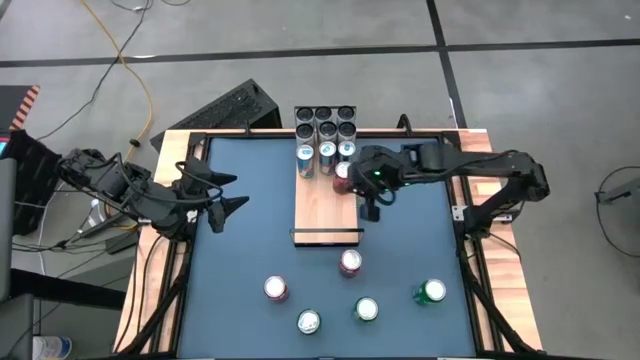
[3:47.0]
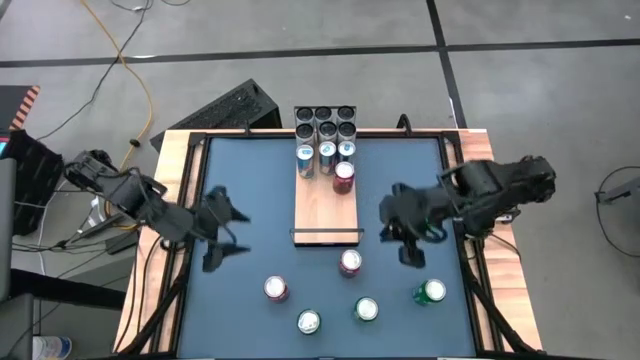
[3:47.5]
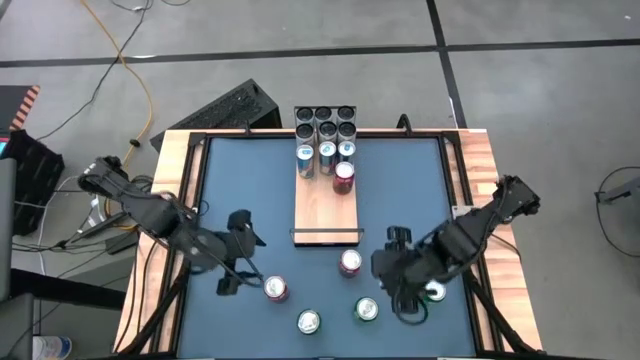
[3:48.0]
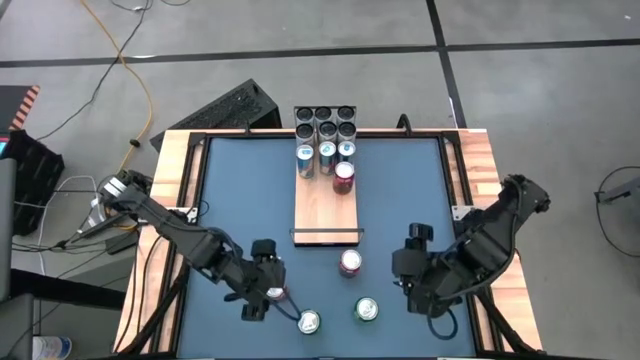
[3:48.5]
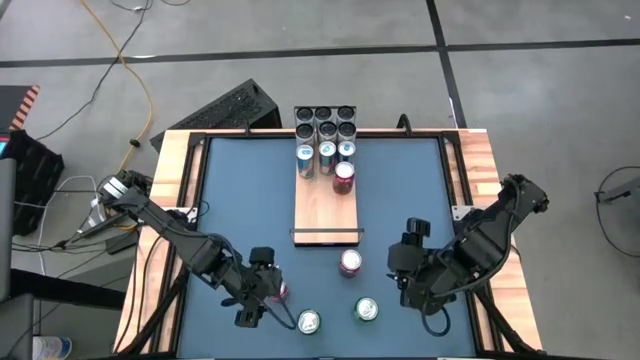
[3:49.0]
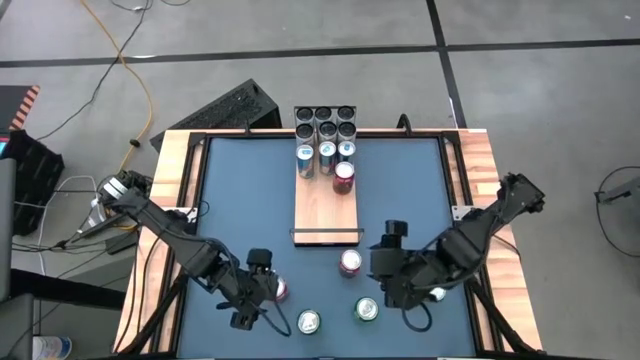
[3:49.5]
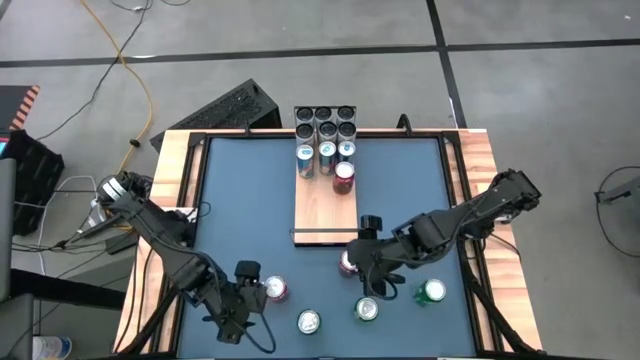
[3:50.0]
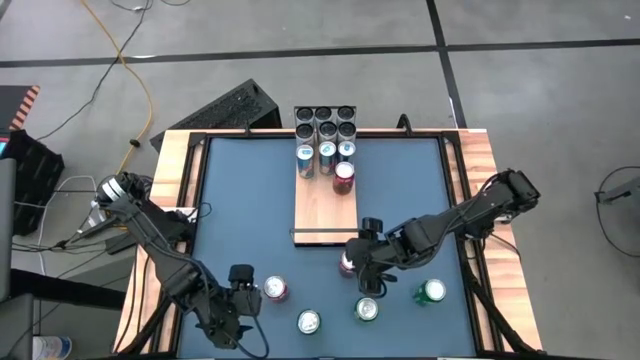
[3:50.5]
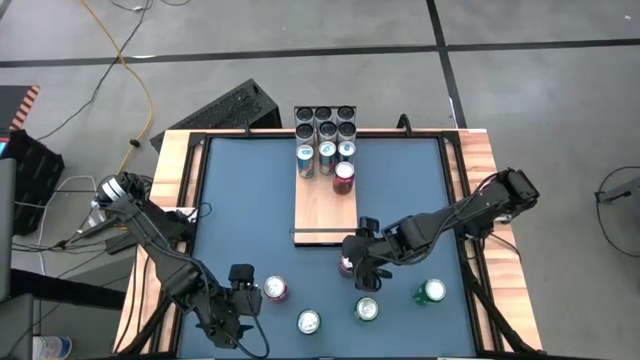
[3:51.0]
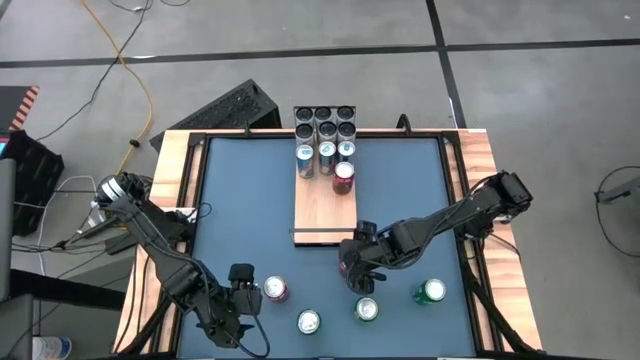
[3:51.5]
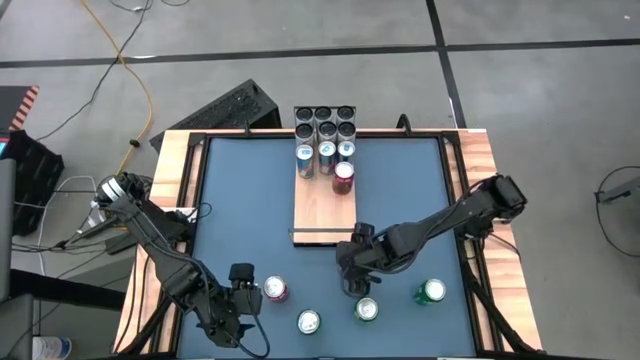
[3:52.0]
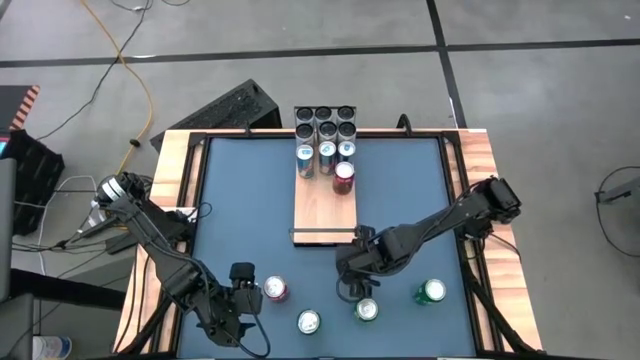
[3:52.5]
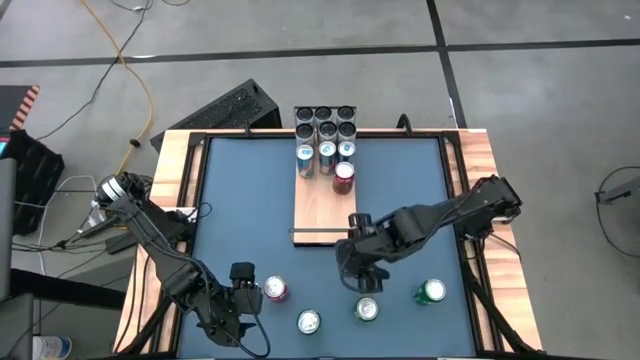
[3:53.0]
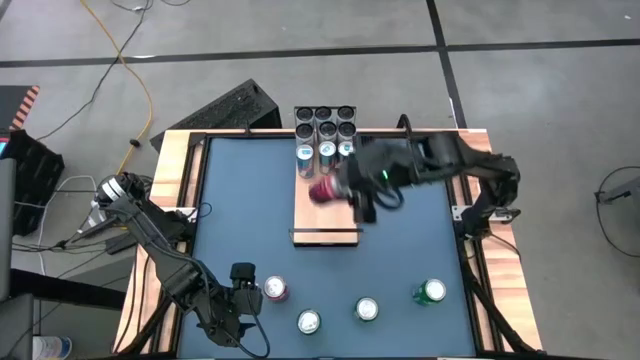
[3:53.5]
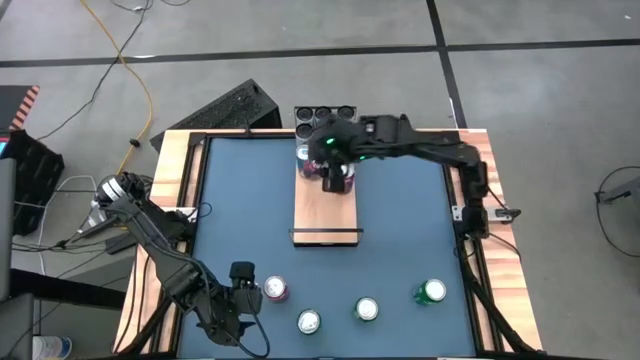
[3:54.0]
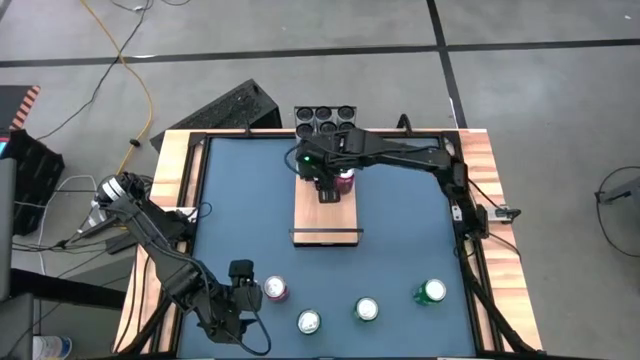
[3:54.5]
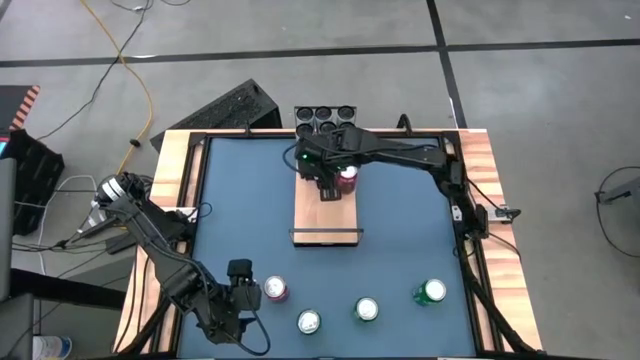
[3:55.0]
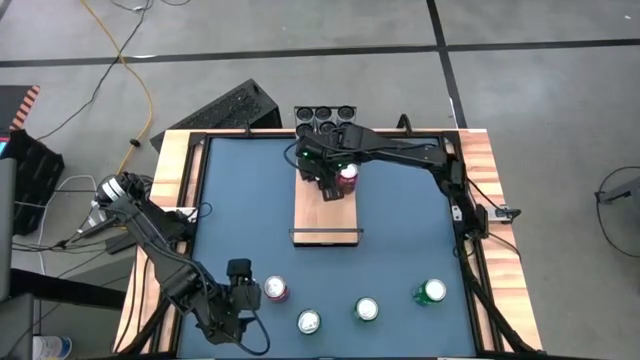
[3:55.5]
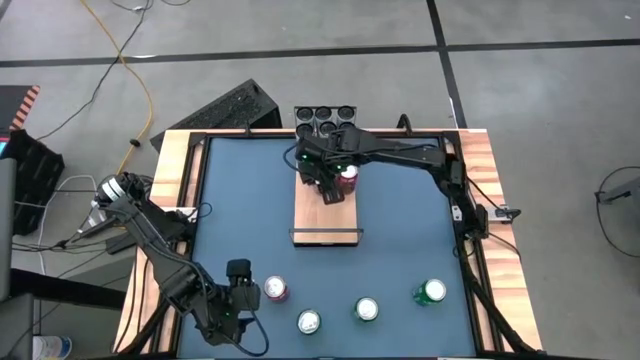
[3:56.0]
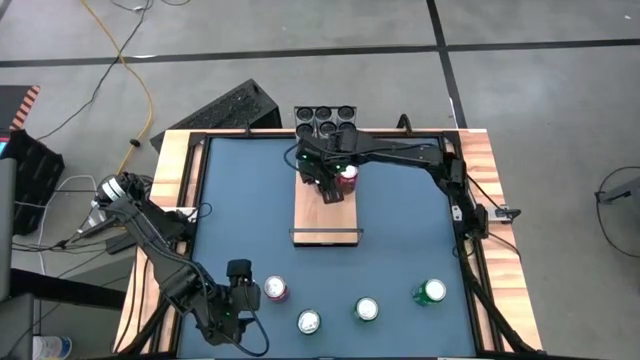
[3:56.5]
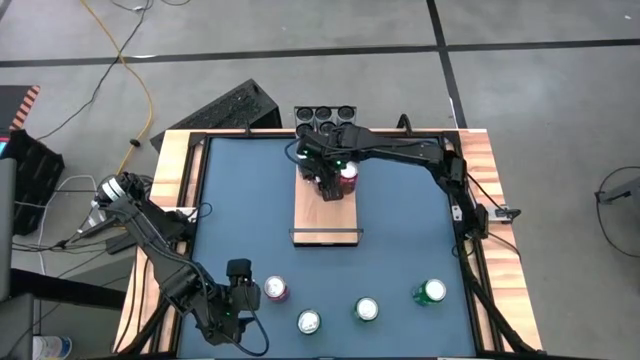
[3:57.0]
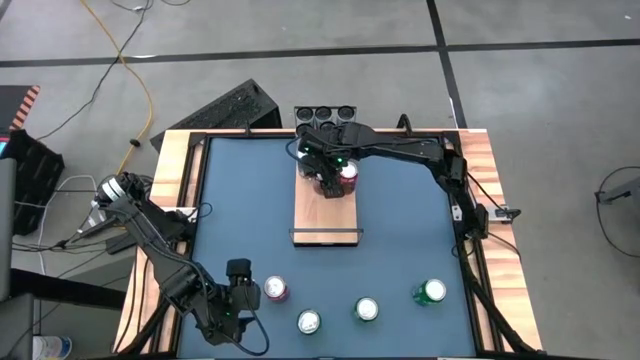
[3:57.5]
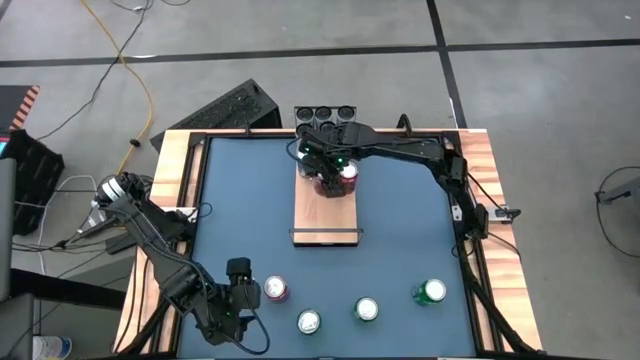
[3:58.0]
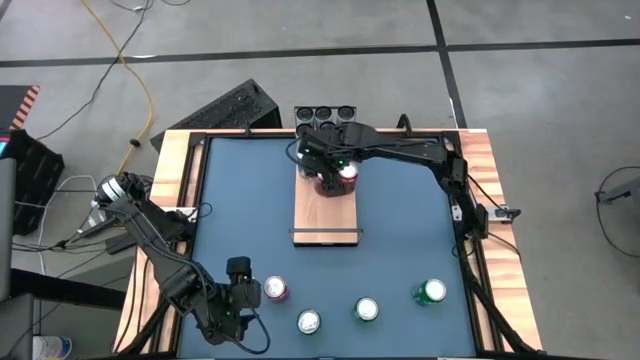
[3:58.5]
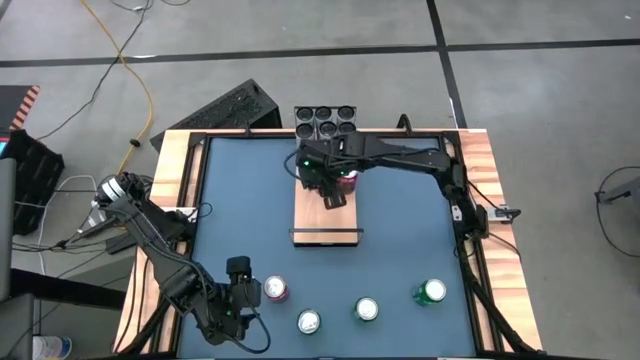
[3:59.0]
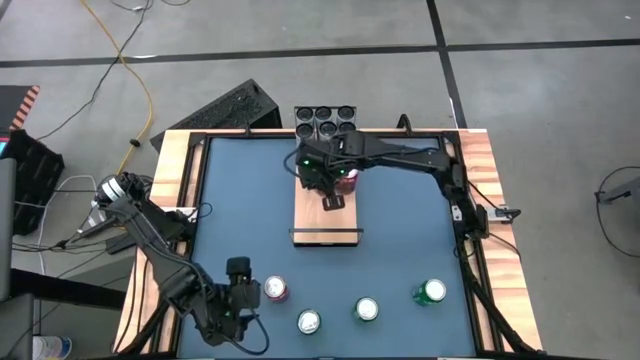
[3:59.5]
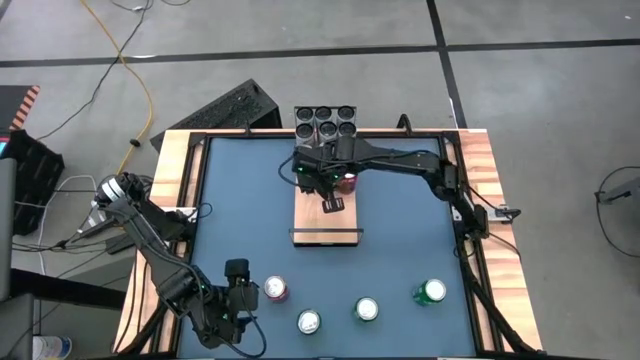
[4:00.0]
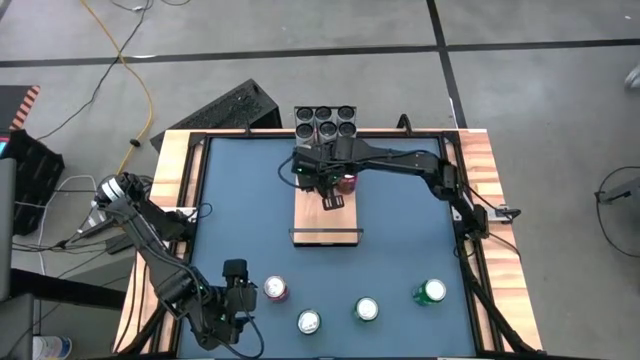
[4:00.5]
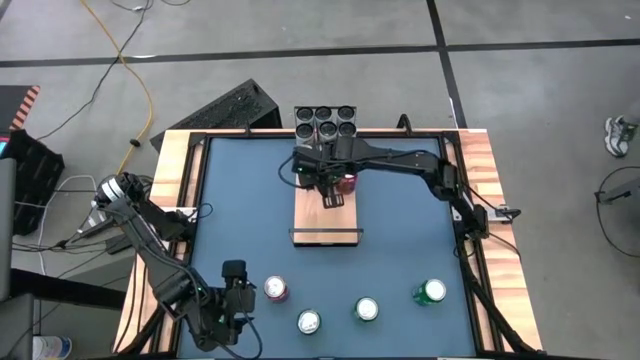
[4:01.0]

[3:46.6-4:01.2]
Task: Place canned beverage on shelf
Put the right red soda can on the shelf aligned with the other red soda can

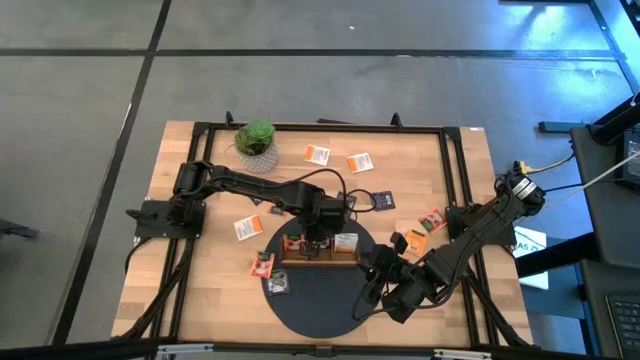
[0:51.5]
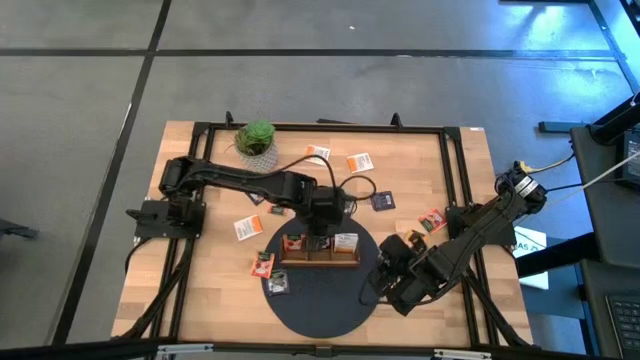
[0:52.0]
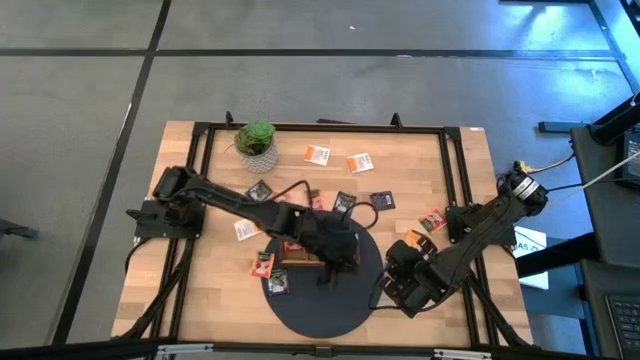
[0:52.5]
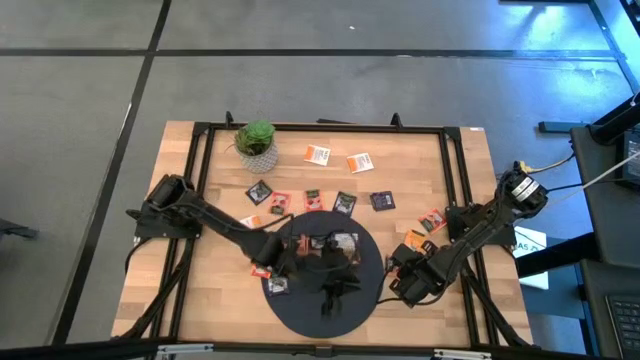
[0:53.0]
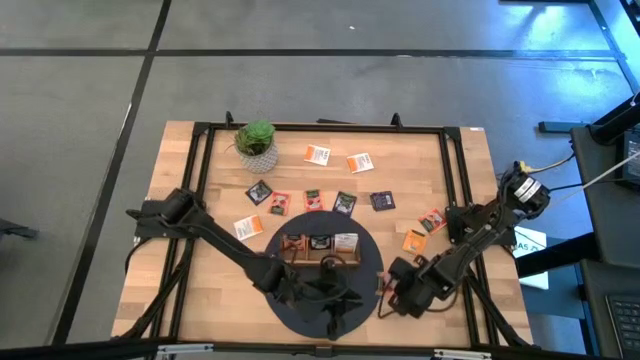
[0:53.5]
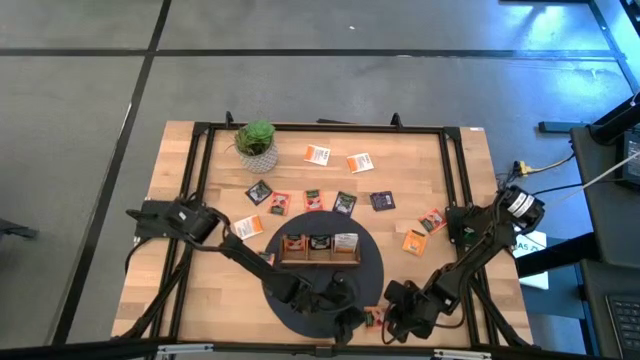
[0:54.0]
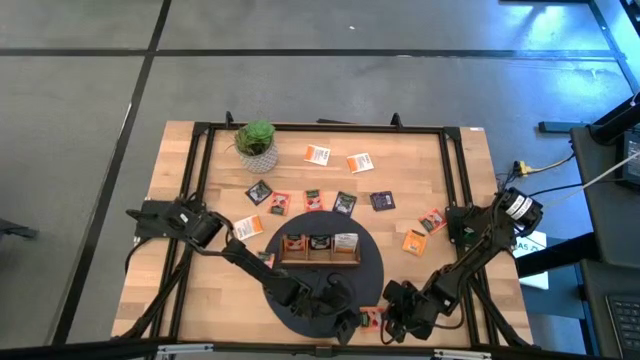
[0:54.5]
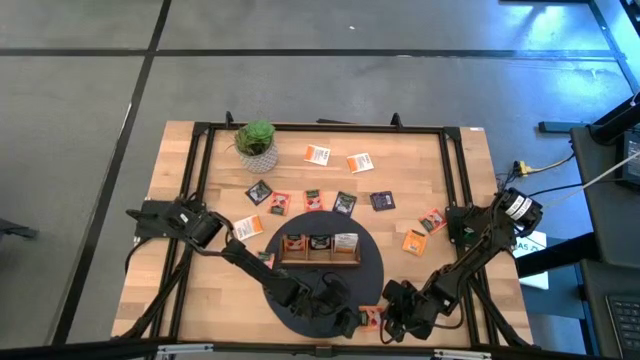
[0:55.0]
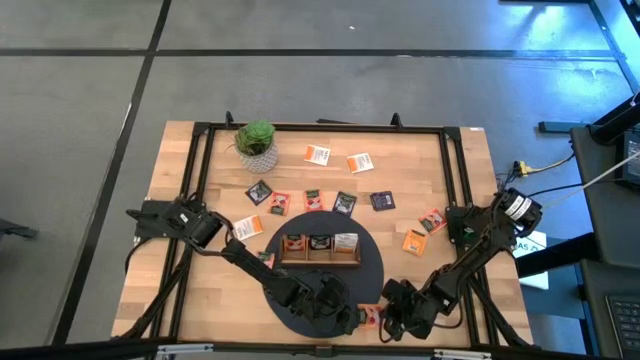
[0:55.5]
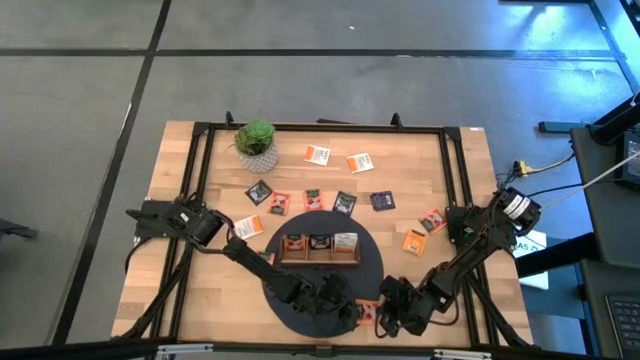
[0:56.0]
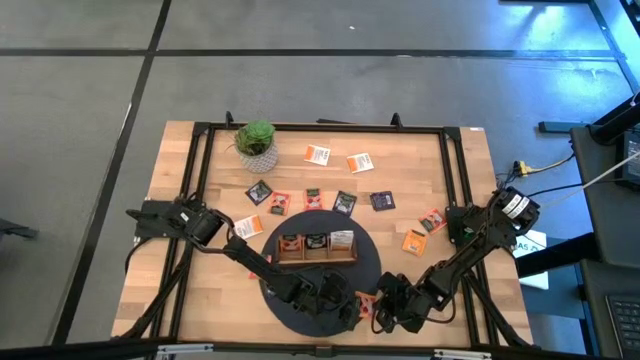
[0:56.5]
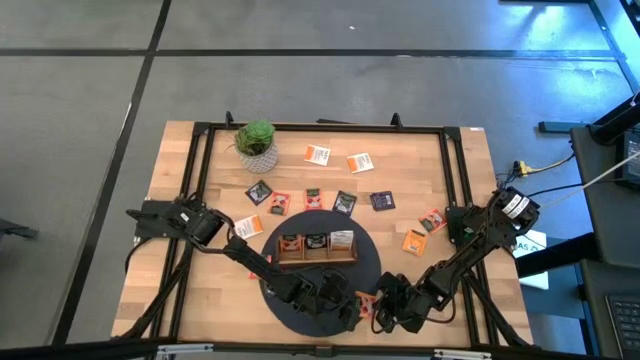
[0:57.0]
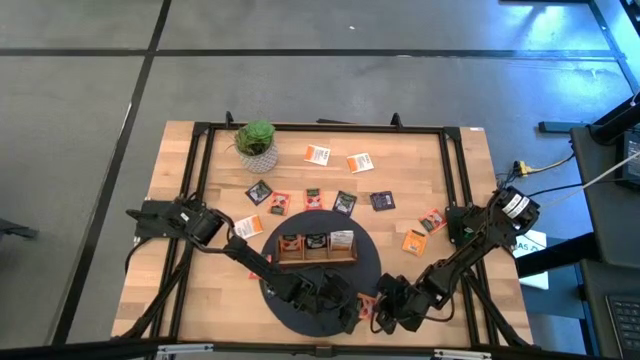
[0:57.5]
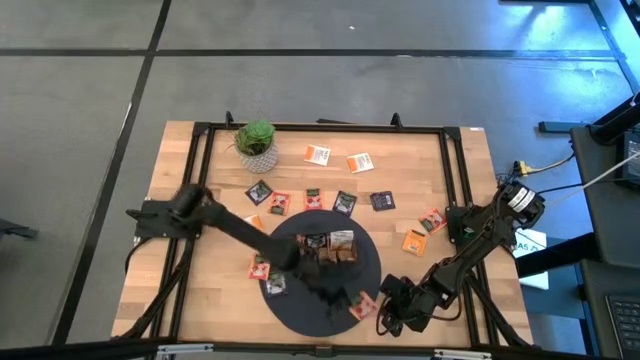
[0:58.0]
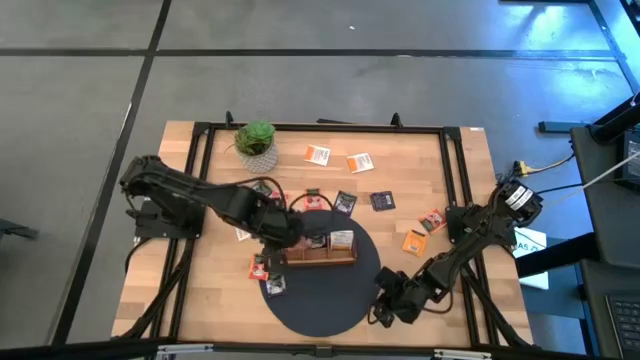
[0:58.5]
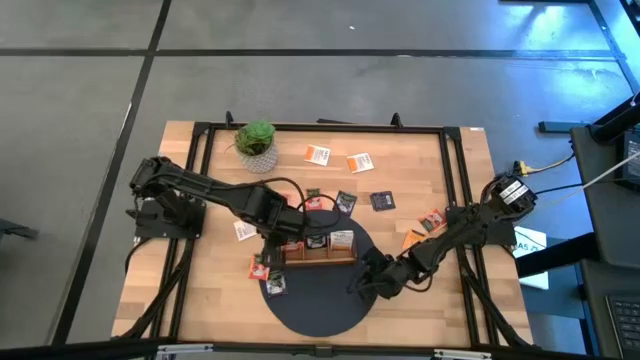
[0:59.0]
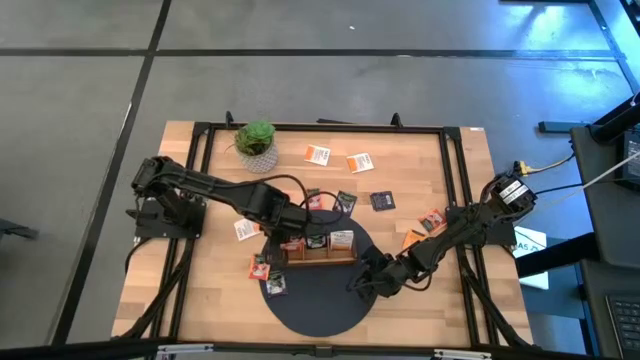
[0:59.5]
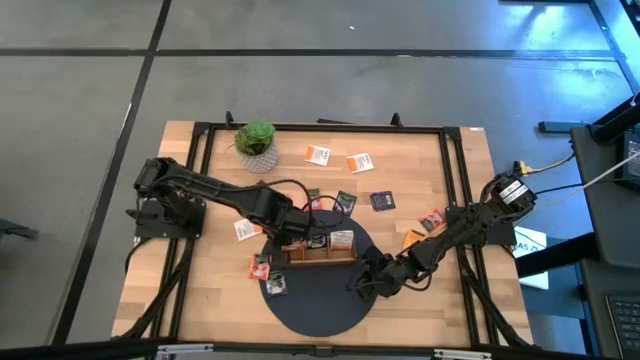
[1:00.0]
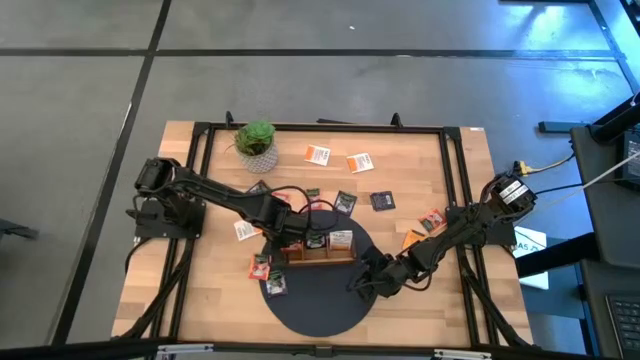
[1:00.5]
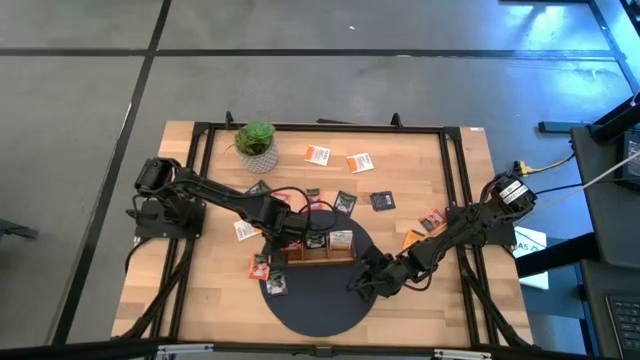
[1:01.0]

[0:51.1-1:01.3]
Task: Pick & Place Tea
Put the orange tea bag into the left slot of the wooden organizer
